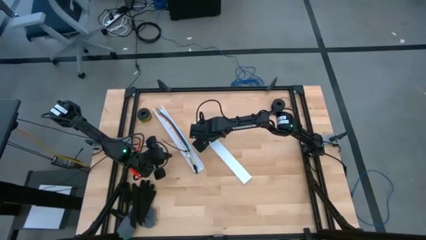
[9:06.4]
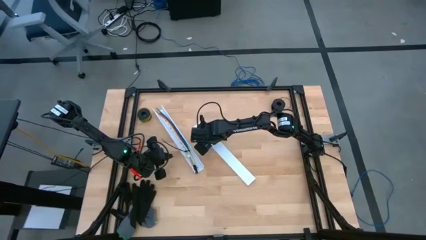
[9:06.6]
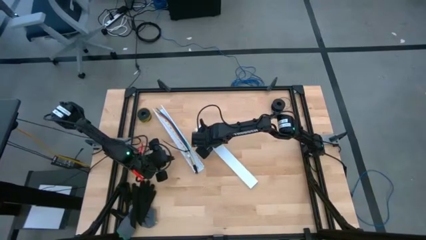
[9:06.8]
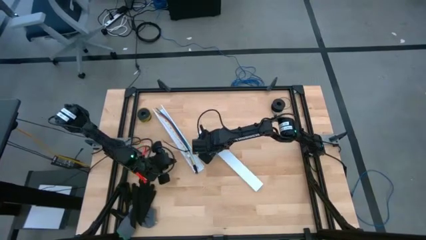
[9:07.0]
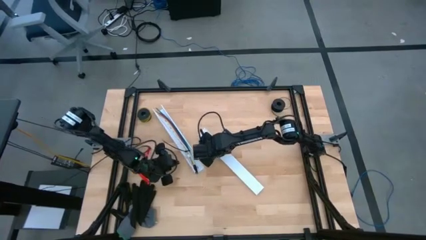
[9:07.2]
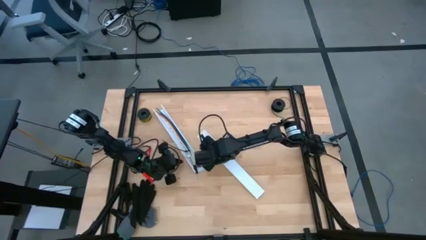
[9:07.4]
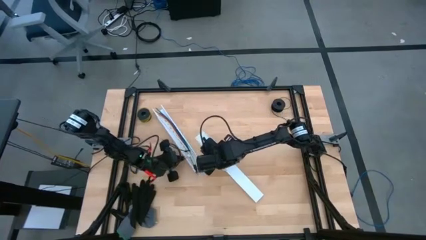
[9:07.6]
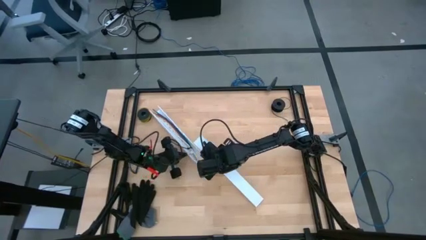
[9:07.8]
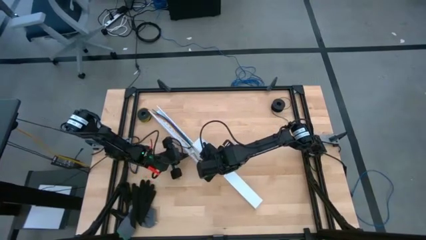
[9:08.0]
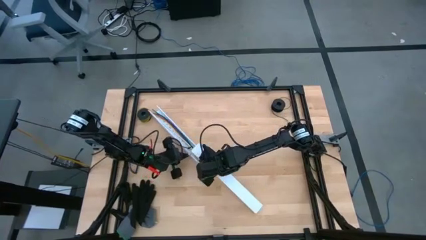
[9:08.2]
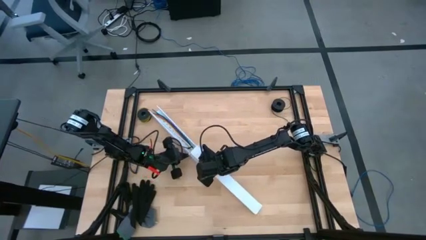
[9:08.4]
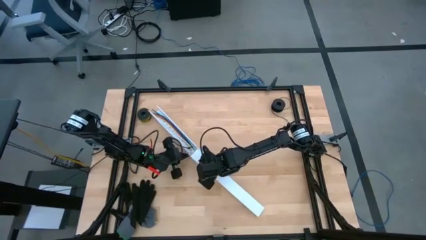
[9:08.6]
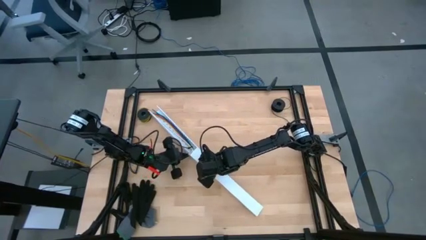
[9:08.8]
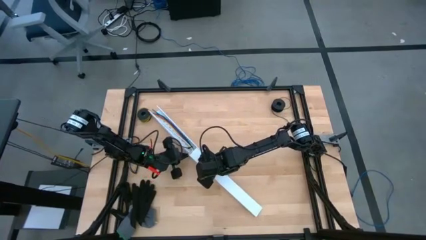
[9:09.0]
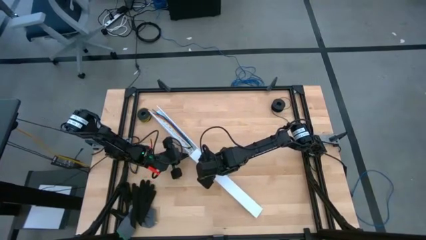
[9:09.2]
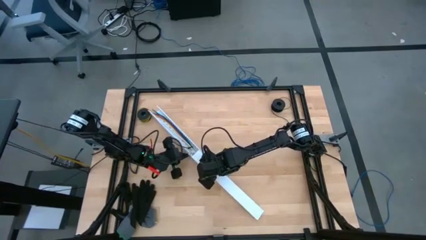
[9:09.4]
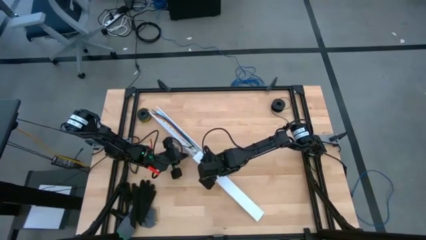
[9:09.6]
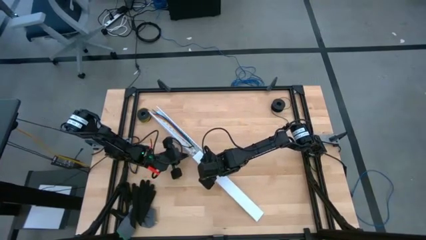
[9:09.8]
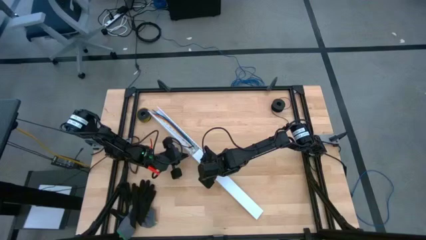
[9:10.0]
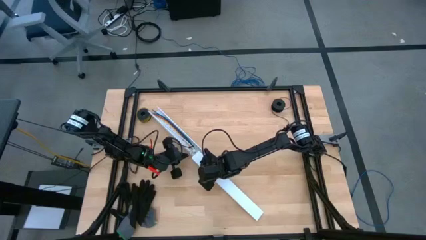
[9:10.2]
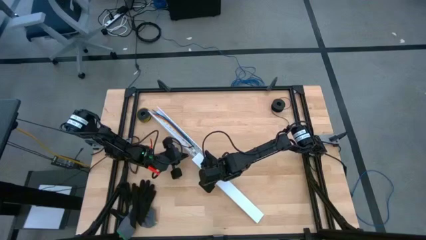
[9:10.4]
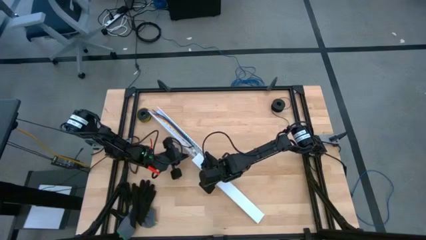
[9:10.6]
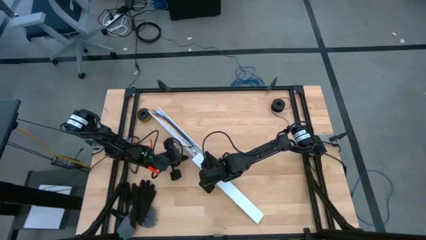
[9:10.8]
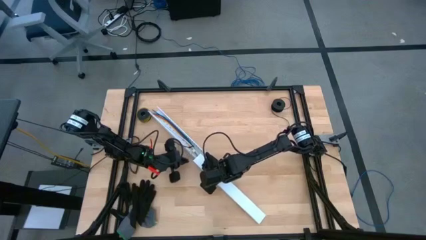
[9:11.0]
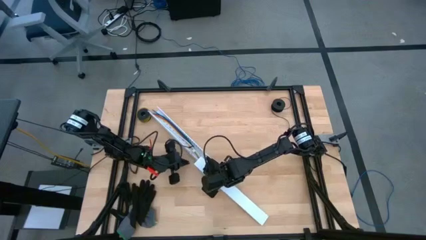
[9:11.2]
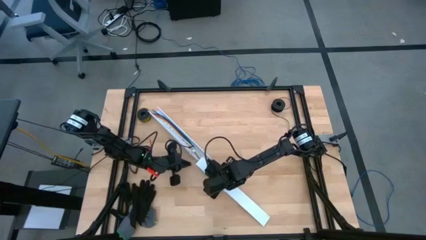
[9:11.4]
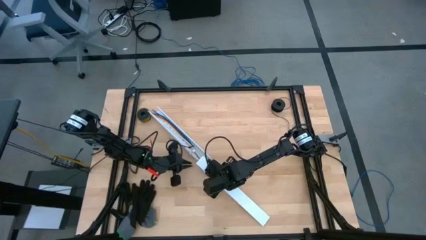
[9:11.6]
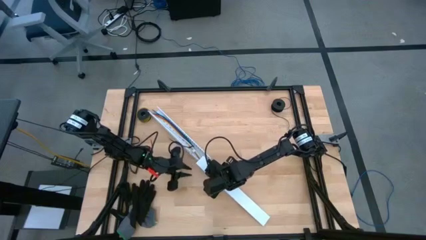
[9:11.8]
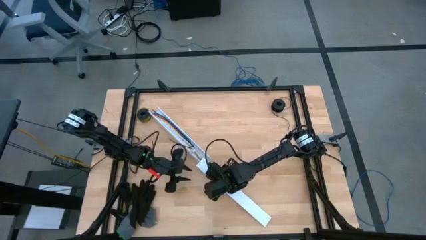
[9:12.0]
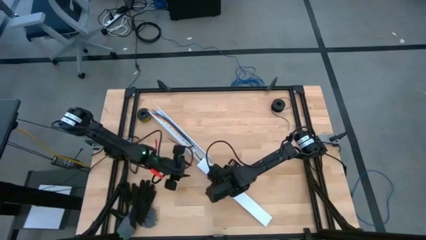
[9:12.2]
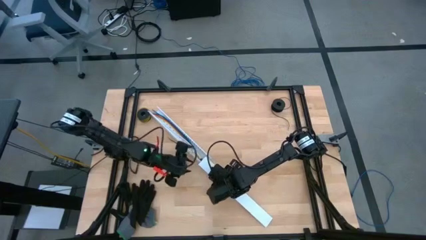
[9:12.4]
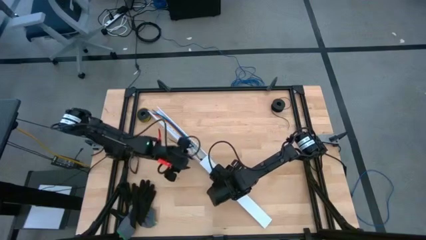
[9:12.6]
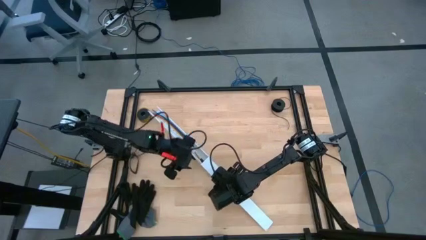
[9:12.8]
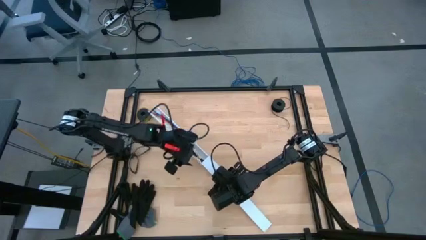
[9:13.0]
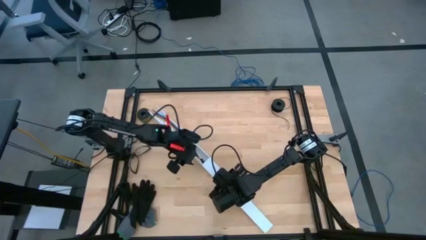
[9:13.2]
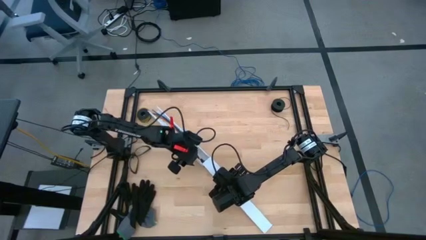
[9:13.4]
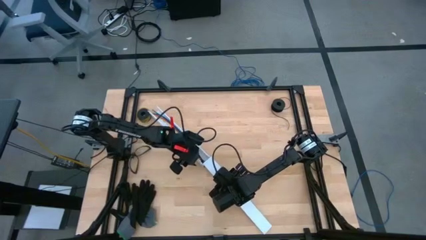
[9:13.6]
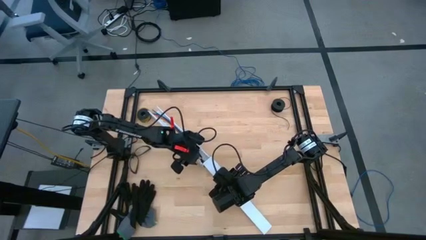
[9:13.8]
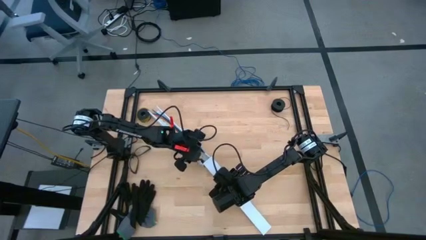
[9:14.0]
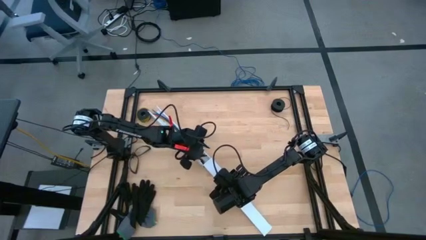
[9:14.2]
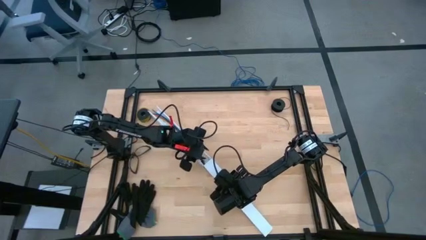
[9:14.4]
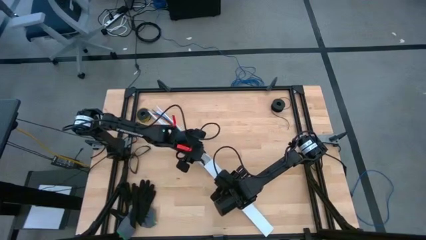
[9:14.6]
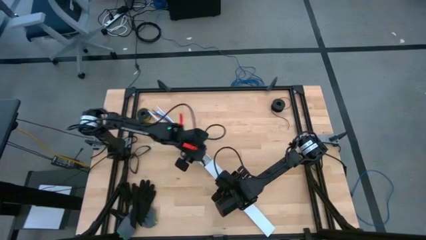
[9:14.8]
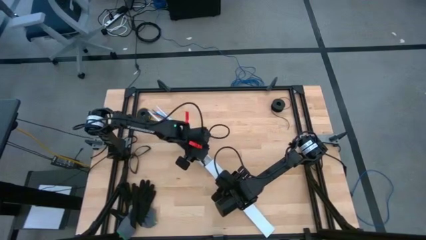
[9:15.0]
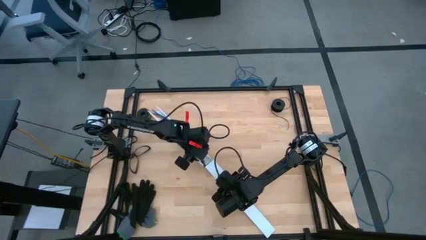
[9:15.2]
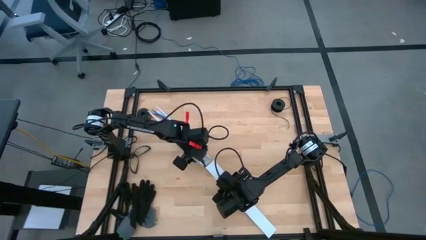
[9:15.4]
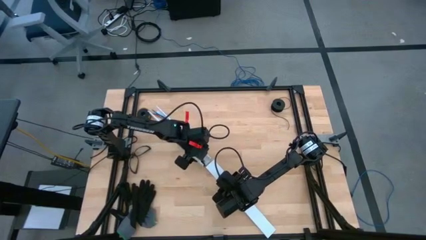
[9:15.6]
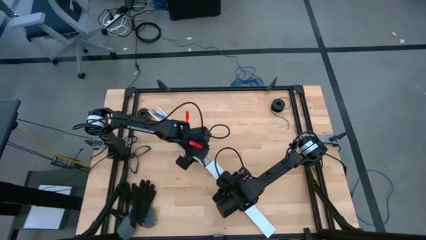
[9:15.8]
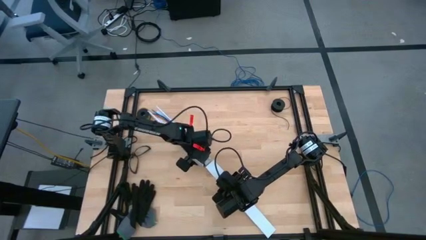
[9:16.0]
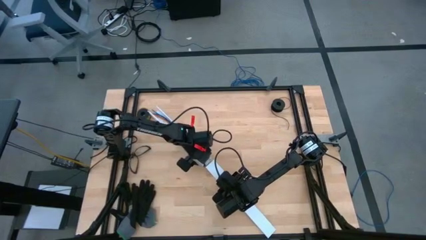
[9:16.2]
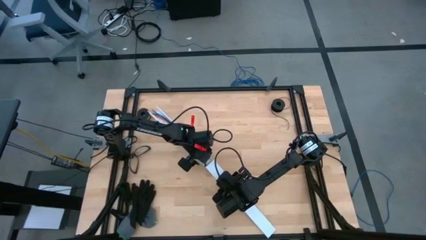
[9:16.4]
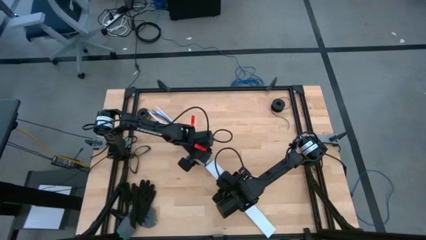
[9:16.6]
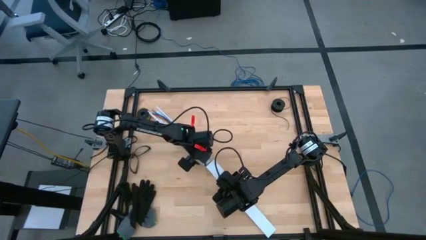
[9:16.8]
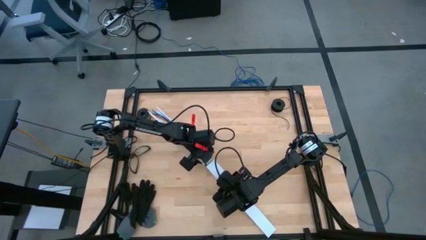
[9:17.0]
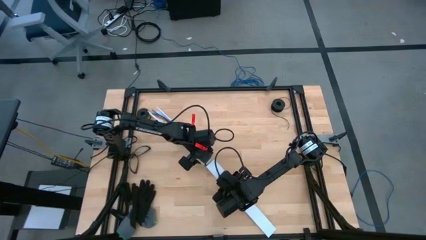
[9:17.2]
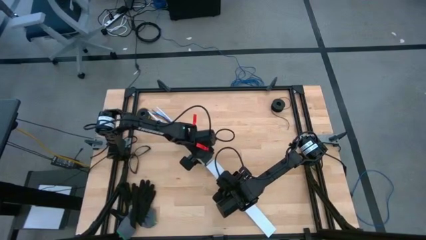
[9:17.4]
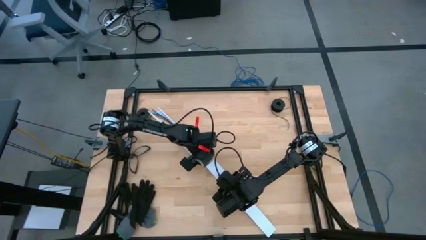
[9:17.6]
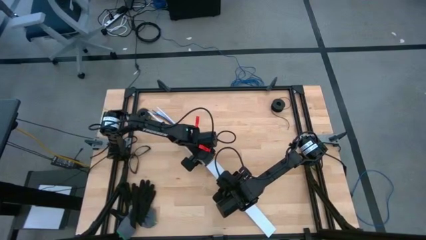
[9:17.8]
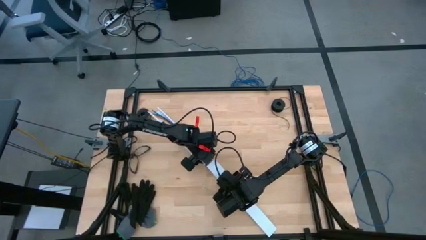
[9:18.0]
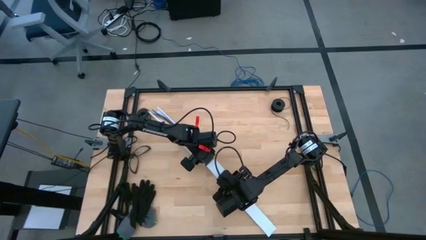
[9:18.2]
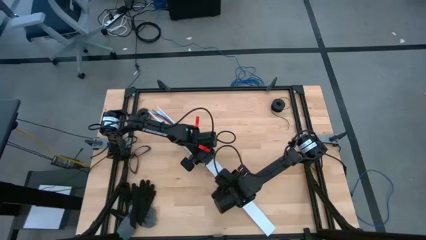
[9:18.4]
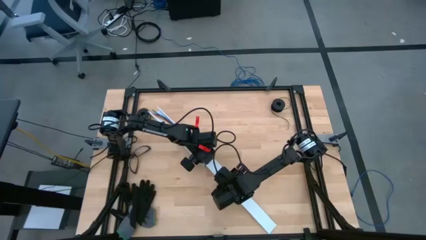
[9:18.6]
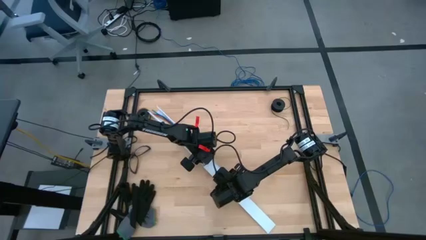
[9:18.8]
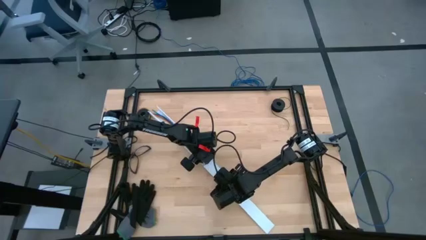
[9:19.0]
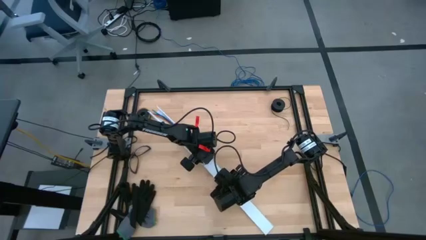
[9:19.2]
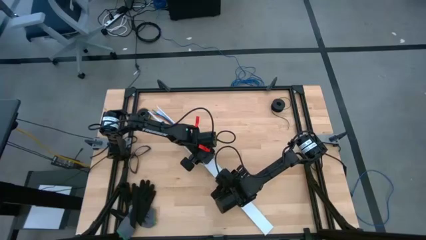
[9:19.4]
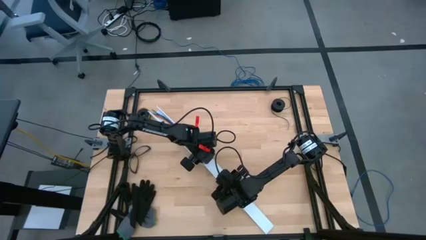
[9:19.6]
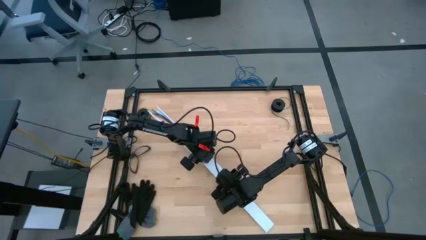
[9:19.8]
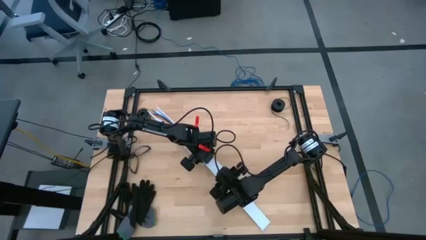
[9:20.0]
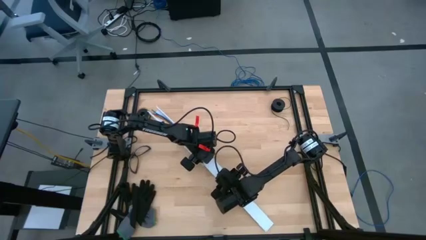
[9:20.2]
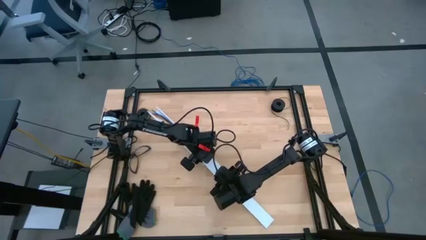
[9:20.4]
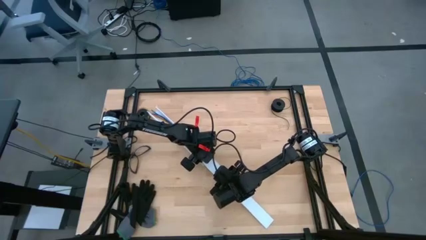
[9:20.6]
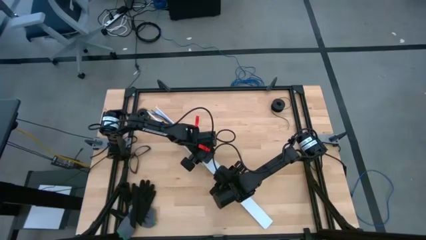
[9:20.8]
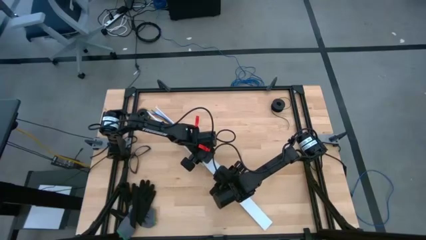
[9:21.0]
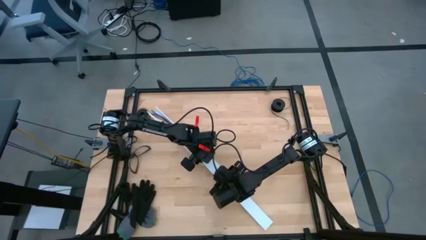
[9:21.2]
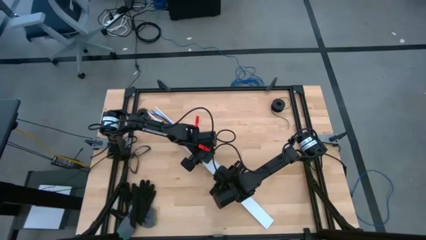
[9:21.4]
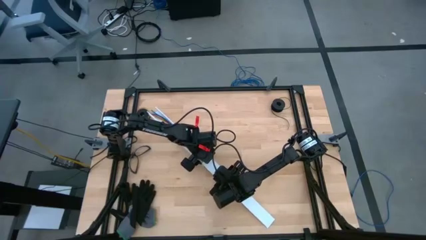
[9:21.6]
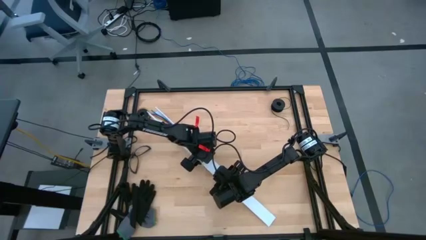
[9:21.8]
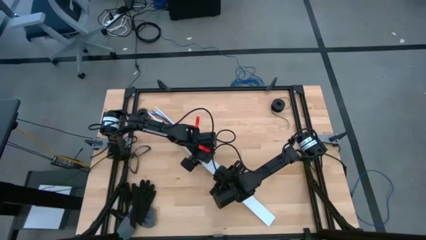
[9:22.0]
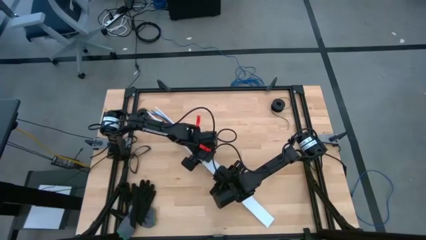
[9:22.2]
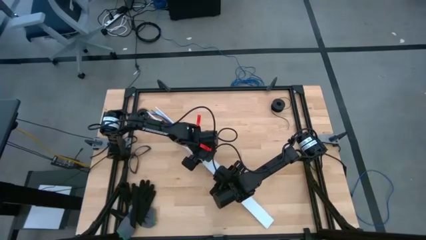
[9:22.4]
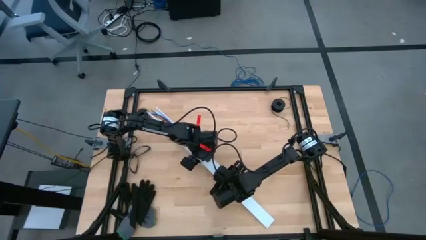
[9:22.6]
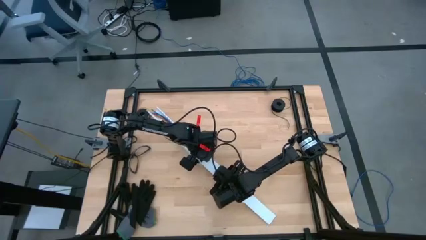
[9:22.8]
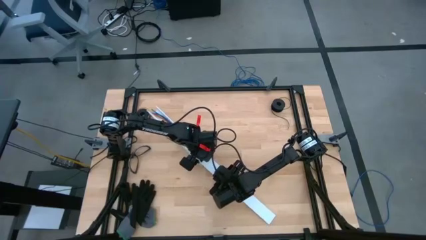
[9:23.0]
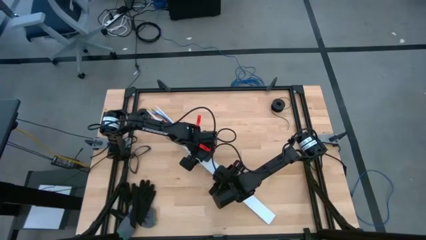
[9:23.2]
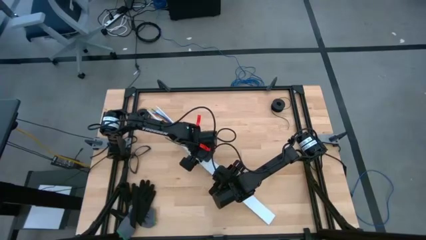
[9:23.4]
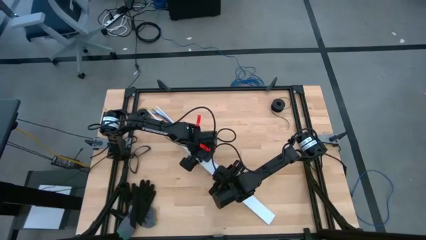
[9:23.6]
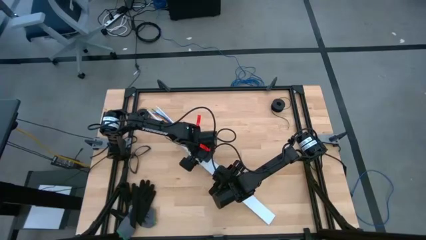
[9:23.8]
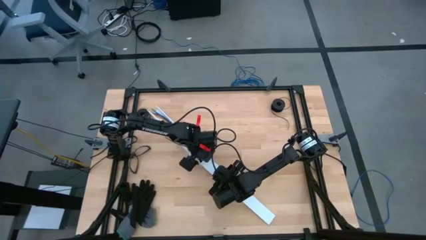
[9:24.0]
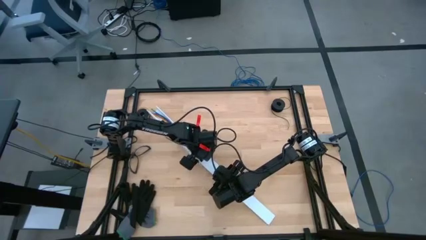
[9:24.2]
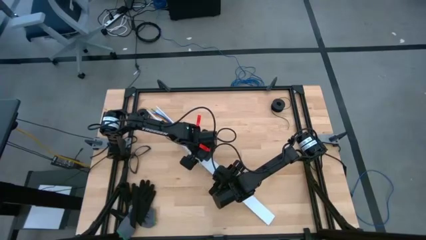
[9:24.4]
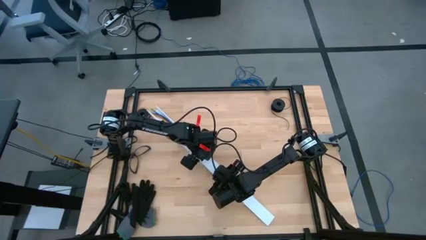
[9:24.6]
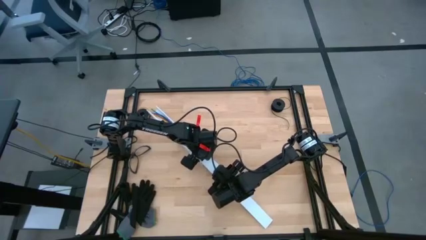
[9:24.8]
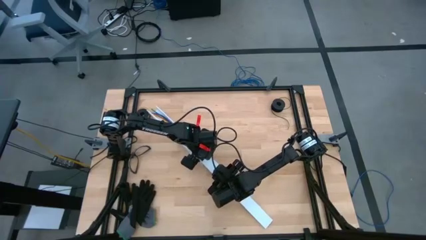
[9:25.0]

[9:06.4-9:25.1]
Task: Ziptie cables
Close the white cable duct
